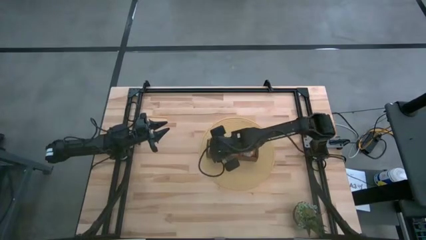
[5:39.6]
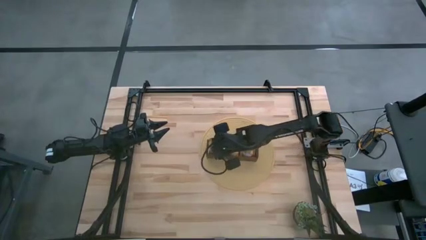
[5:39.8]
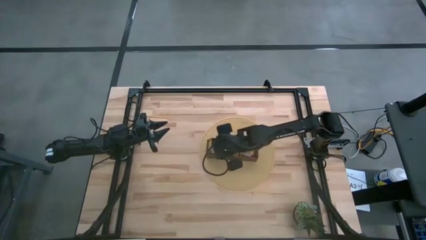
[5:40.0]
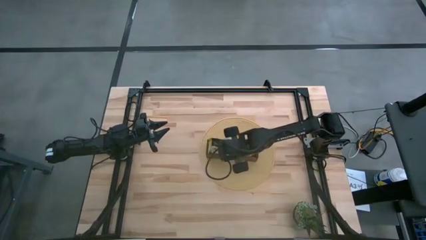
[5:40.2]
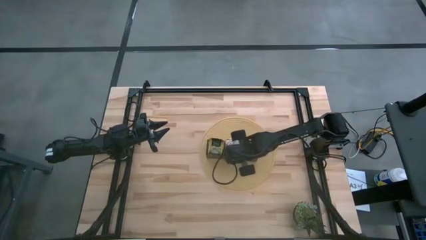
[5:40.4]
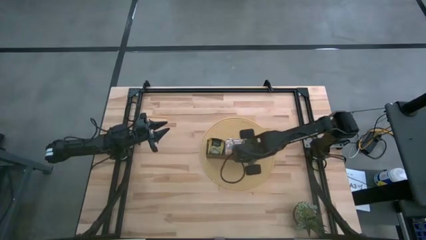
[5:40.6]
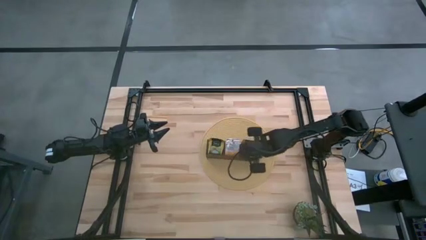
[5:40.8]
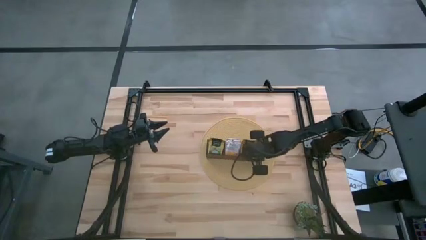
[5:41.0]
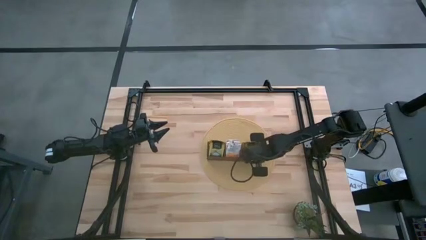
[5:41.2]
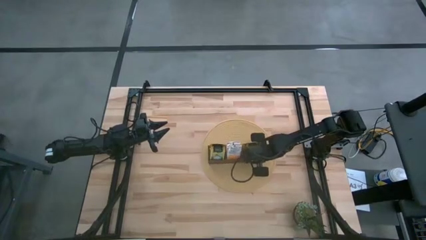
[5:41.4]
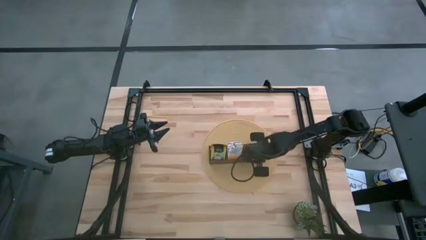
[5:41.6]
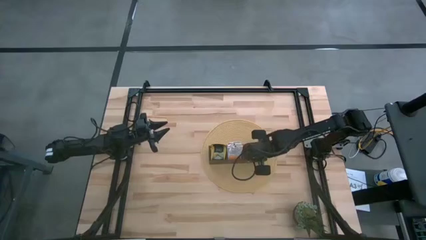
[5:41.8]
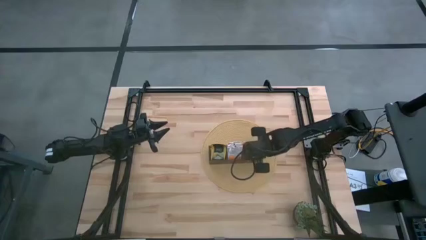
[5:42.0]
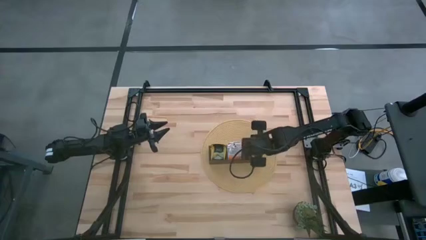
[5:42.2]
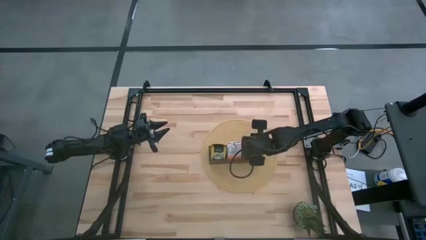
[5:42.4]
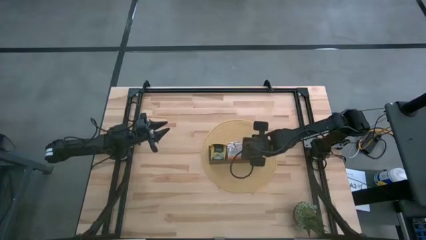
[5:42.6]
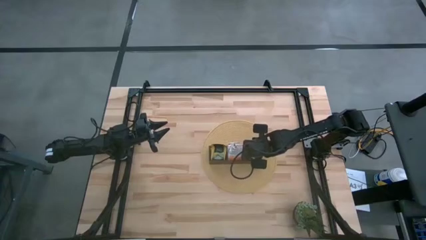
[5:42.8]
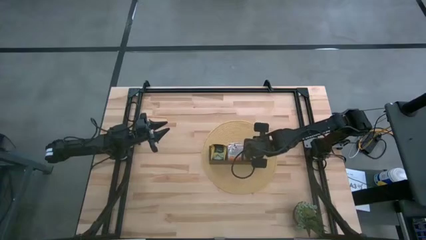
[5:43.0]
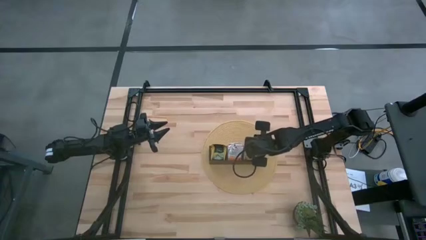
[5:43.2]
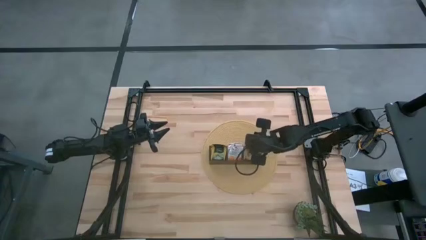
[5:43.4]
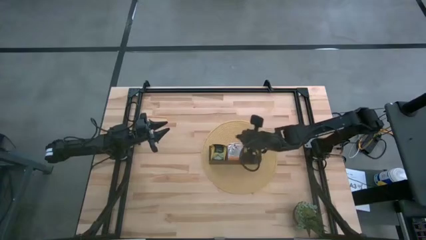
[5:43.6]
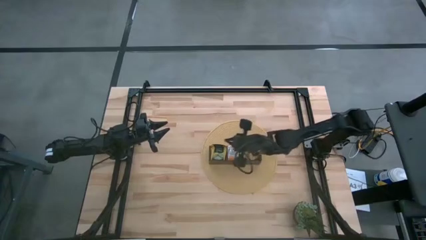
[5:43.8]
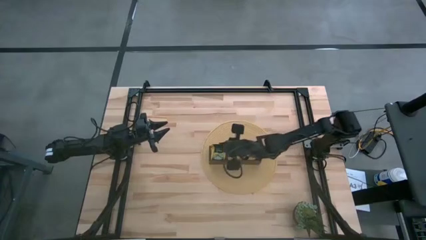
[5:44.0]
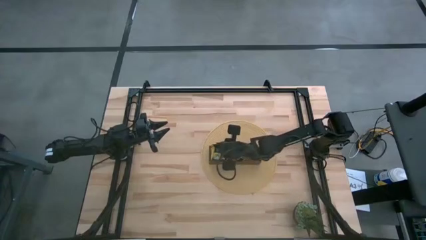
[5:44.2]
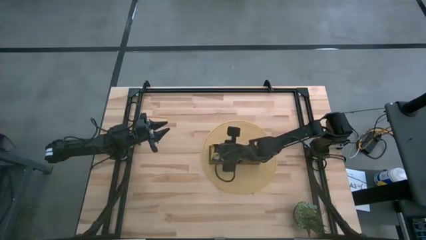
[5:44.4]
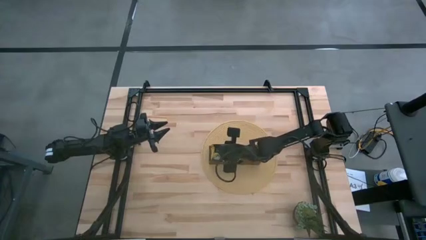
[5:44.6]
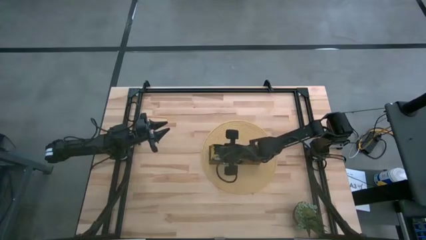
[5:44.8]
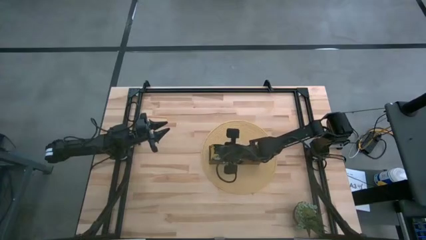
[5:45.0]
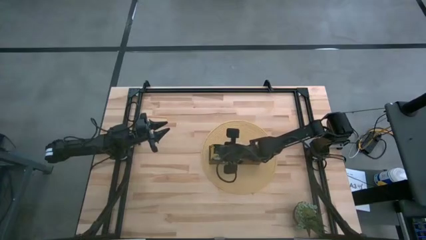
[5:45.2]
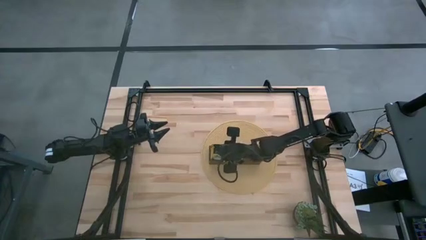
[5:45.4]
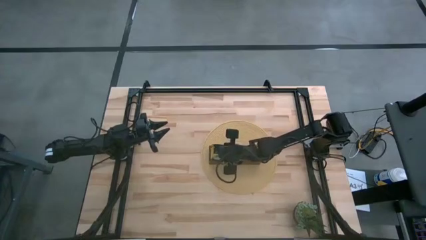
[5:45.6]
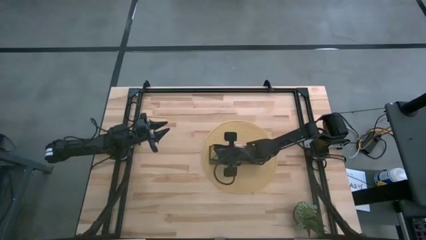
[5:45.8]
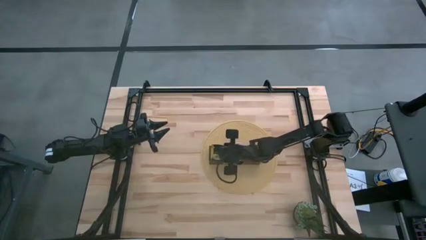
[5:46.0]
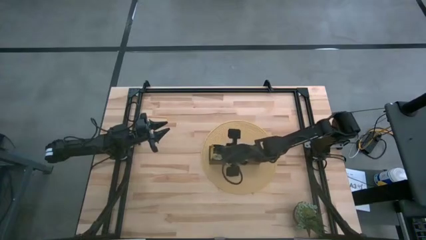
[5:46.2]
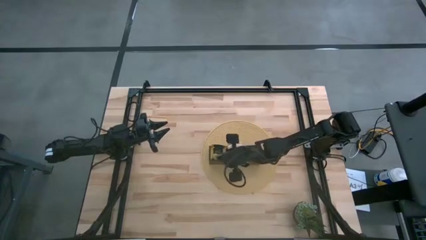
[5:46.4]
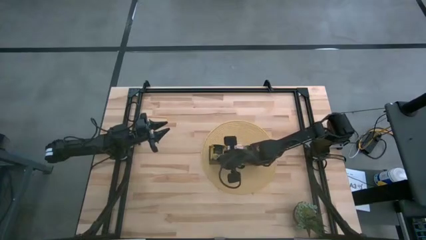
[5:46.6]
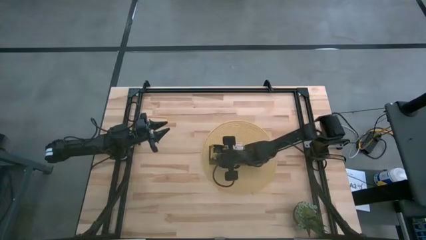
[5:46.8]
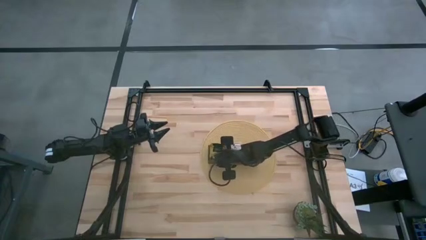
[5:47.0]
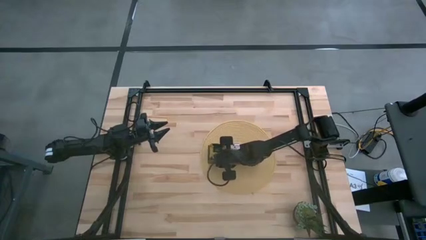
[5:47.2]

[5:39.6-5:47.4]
Task: Pick & Place Tea
Adjust the tea bags

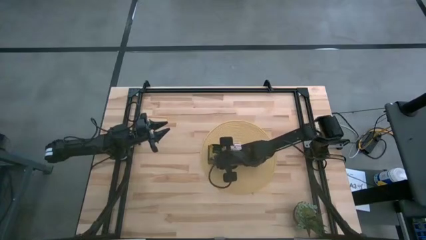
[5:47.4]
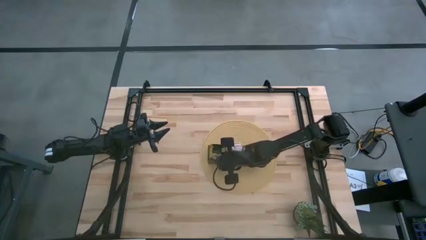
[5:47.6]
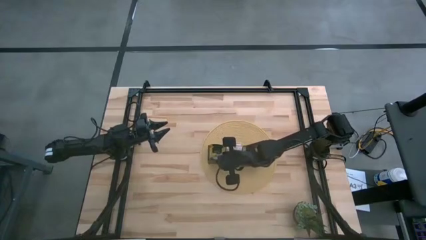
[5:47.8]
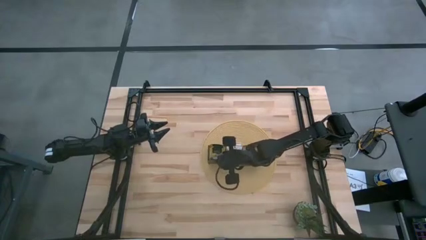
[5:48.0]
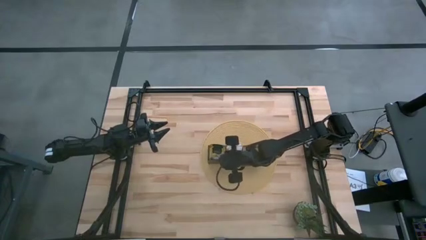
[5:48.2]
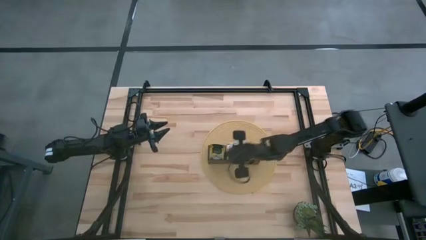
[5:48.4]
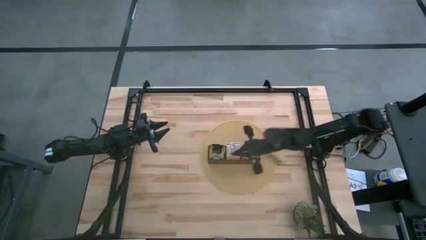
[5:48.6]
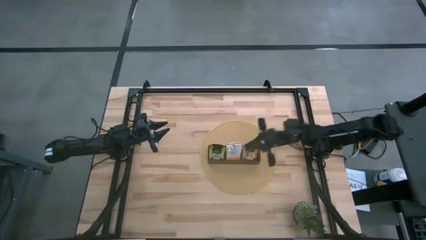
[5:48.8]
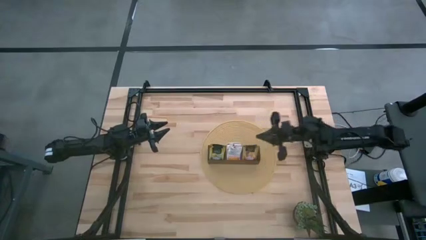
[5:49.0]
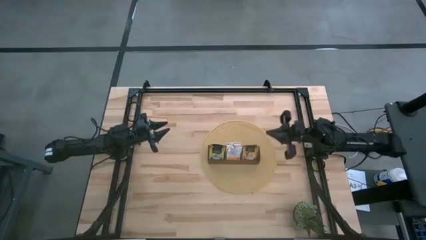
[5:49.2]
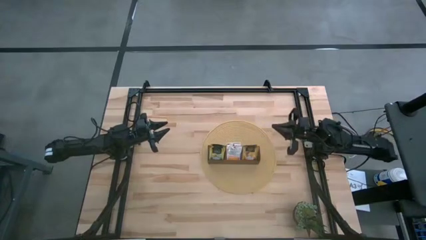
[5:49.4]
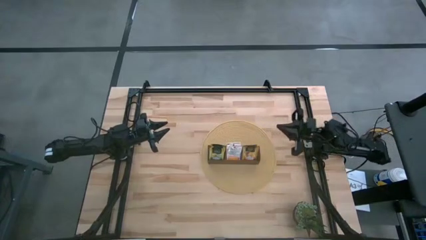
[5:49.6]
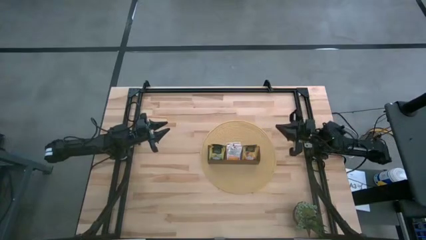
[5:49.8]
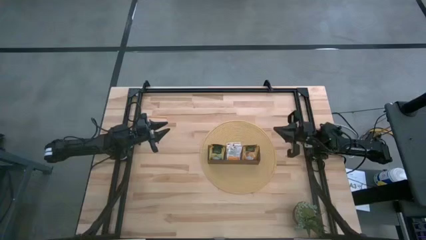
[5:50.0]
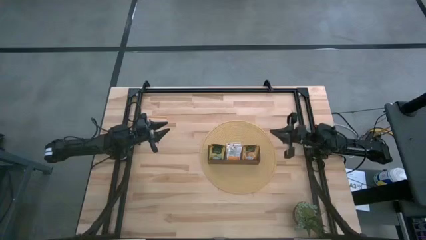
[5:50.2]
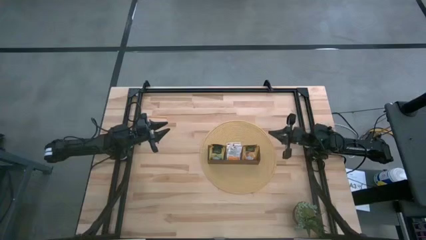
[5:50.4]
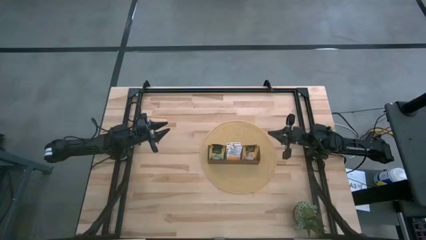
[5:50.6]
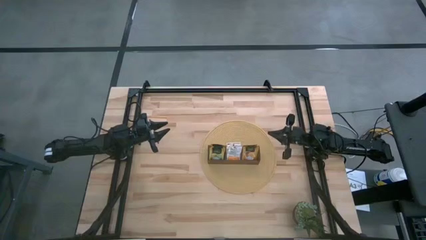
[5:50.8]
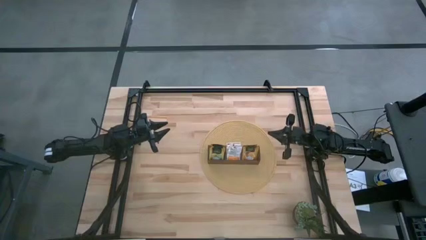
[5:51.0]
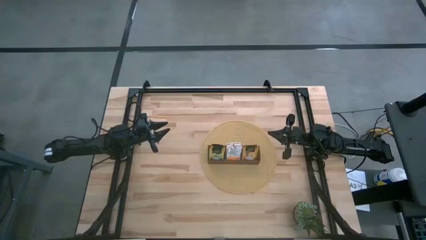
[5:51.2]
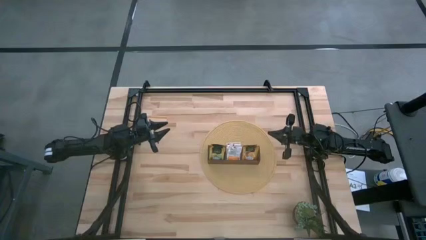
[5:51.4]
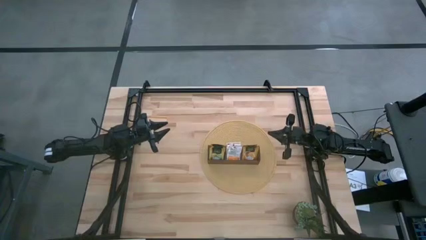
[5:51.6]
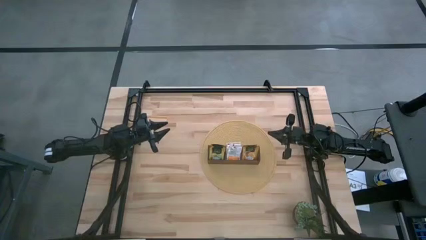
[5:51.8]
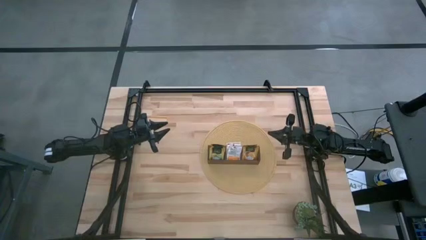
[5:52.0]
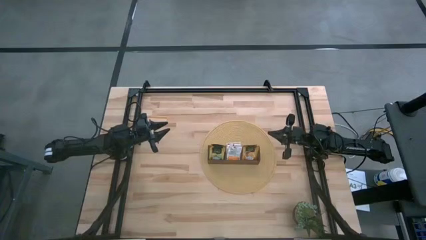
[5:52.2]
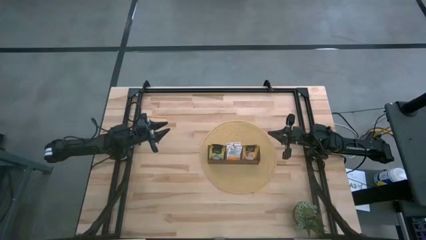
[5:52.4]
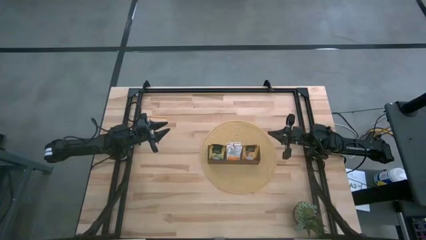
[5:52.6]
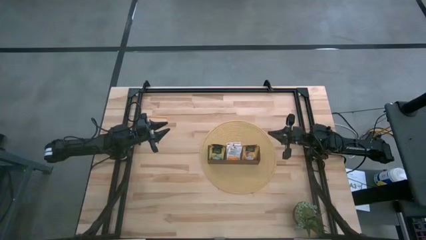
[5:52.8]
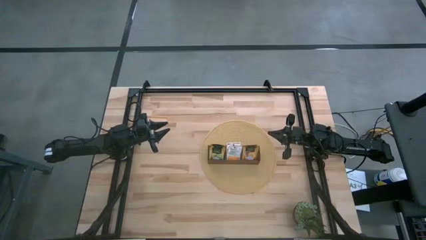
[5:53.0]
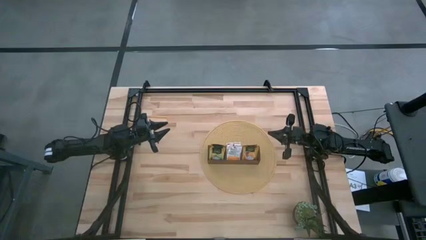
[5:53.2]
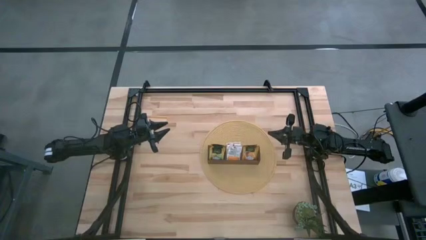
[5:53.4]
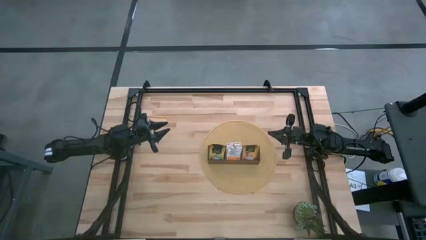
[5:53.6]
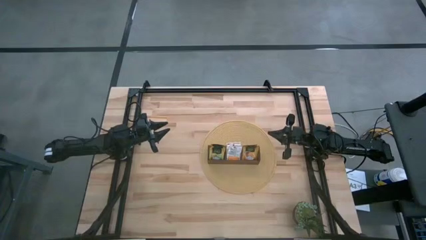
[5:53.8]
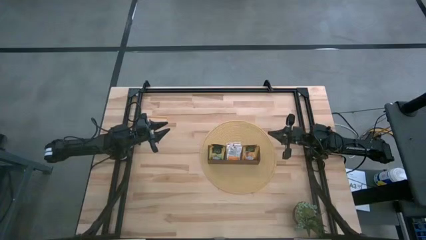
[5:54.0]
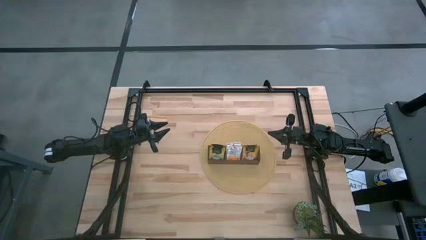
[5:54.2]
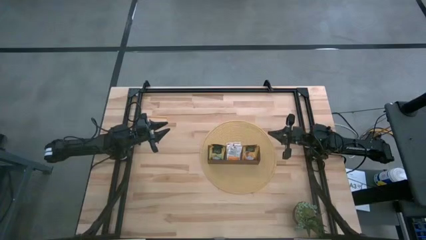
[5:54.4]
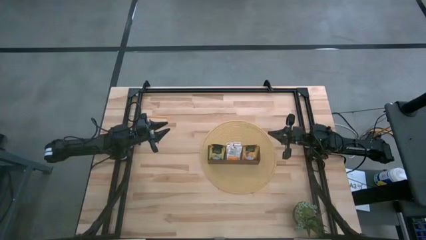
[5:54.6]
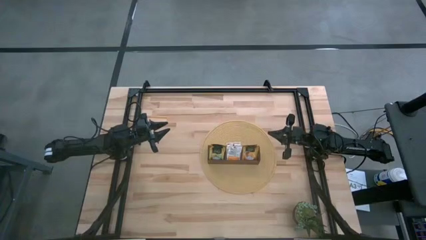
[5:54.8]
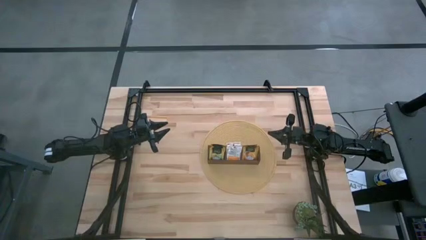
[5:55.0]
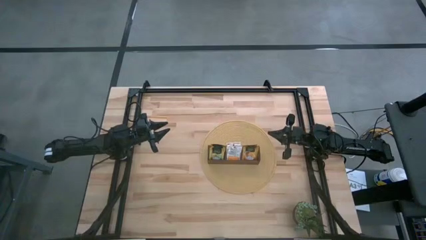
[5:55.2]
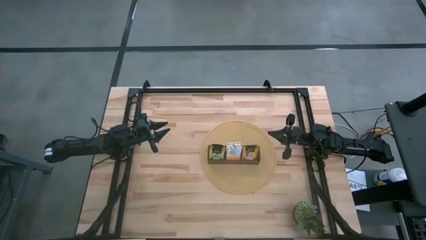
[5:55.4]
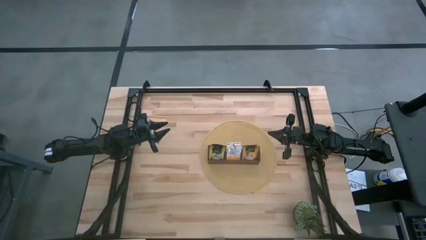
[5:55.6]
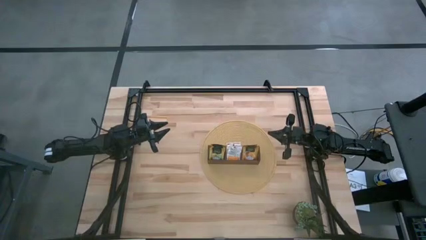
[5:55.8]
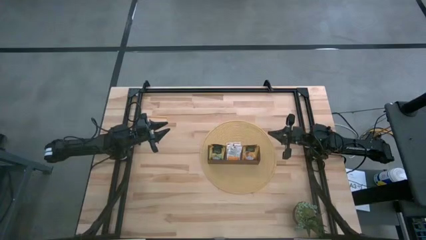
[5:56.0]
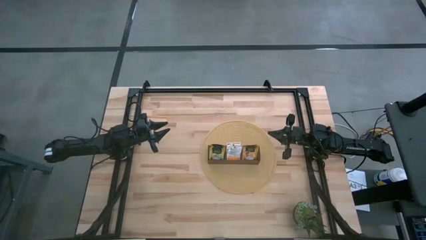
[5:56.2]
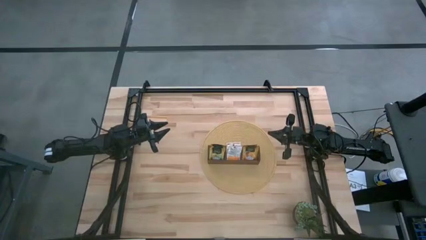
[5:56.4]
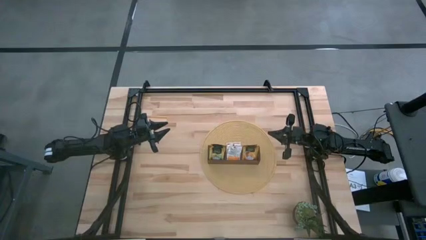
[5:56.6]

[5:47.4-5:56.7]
Return to Home Position
